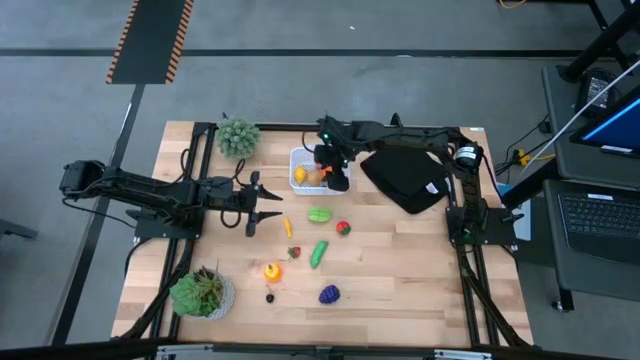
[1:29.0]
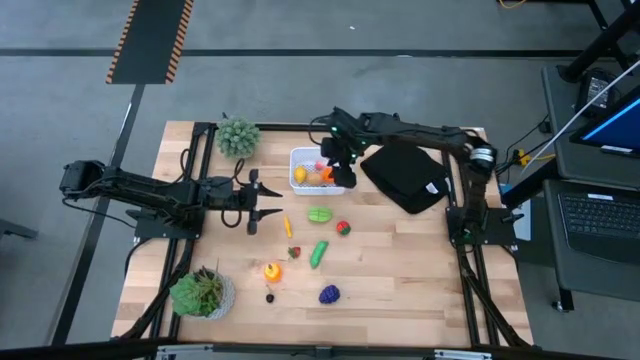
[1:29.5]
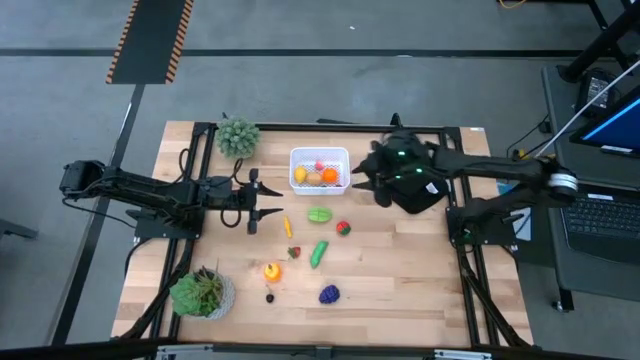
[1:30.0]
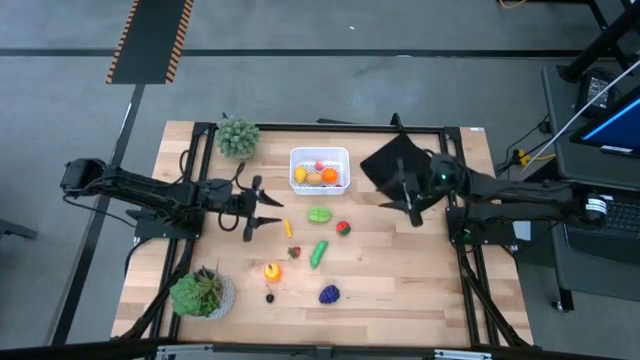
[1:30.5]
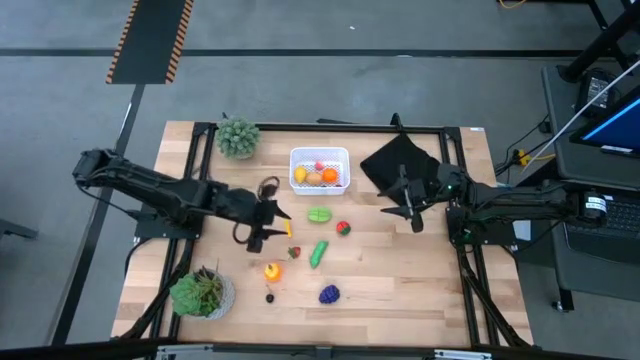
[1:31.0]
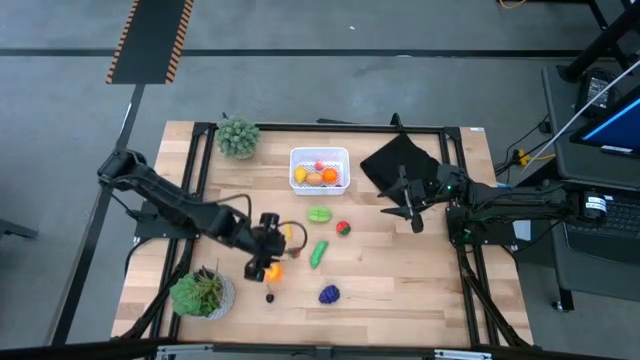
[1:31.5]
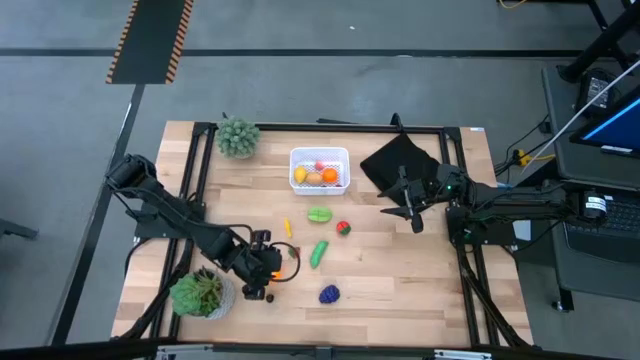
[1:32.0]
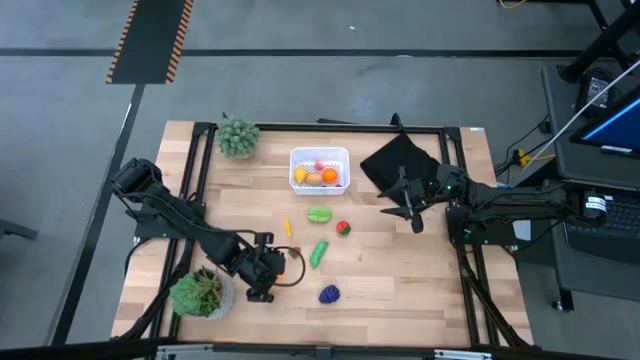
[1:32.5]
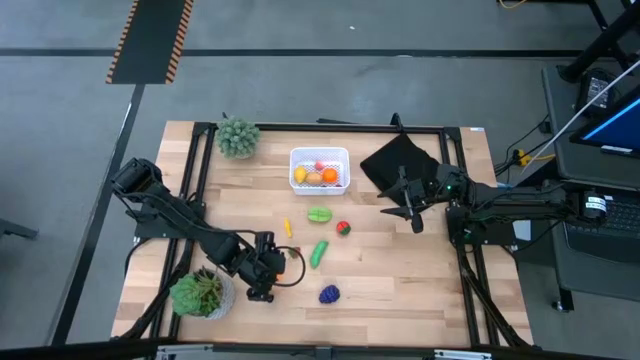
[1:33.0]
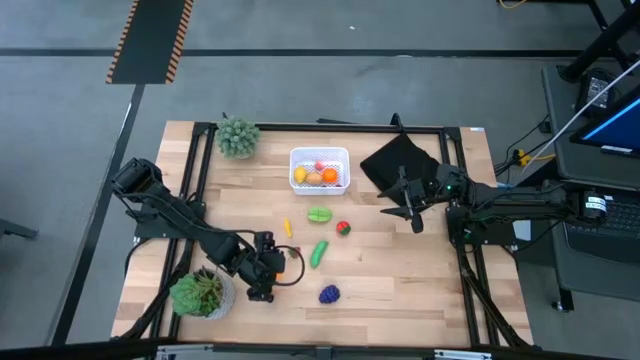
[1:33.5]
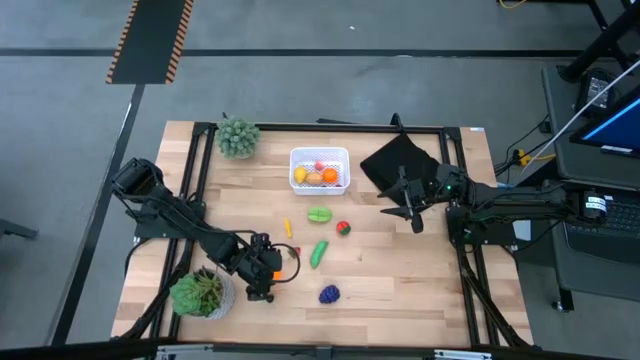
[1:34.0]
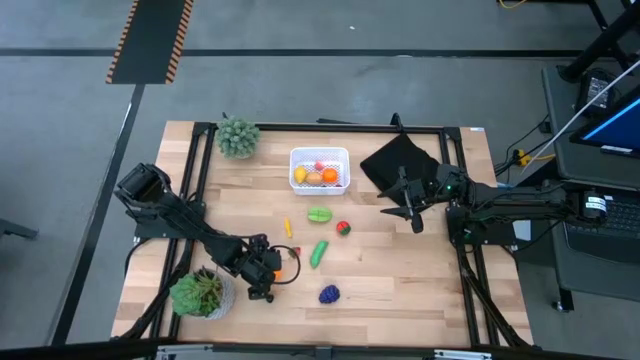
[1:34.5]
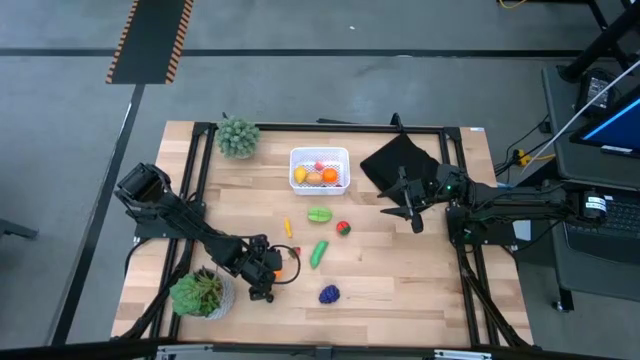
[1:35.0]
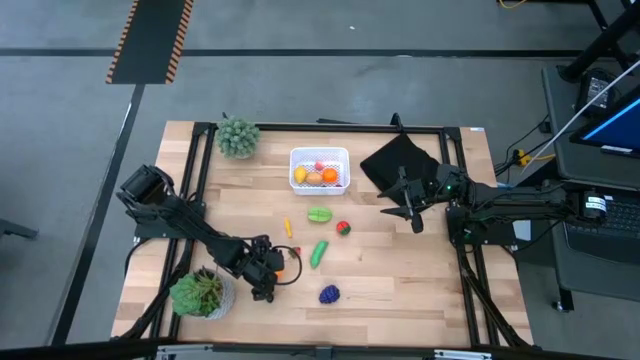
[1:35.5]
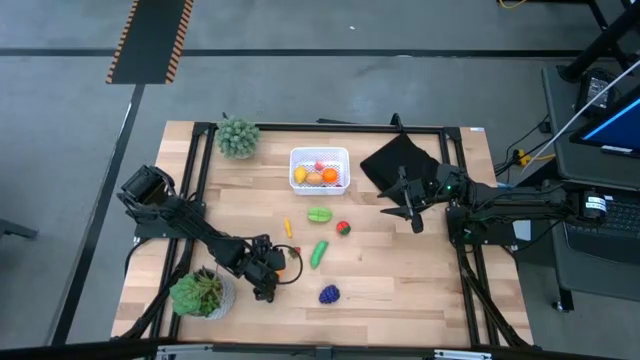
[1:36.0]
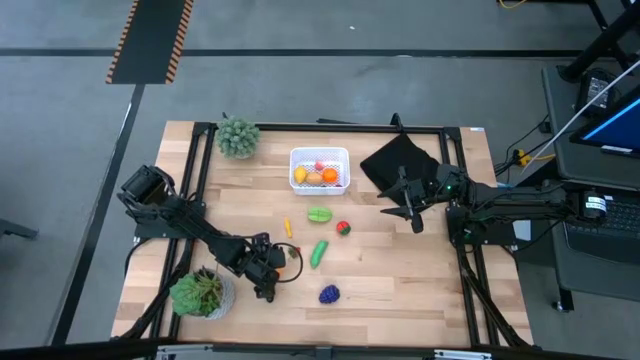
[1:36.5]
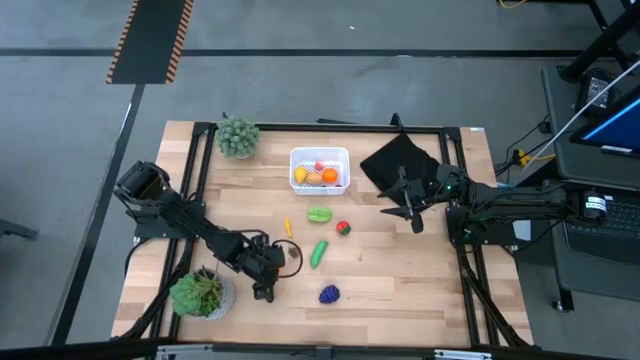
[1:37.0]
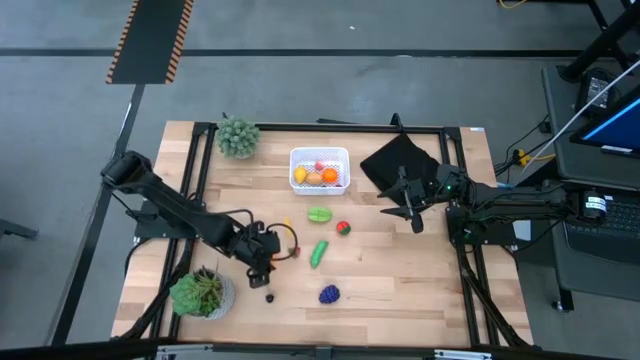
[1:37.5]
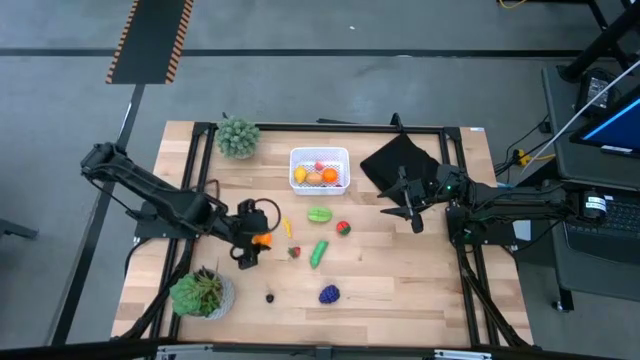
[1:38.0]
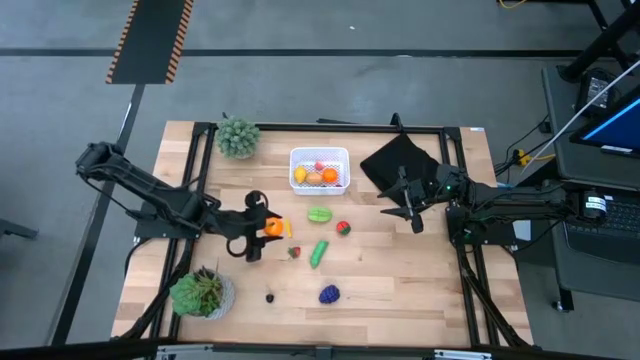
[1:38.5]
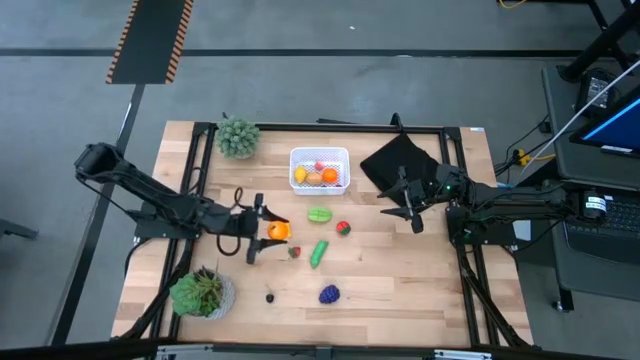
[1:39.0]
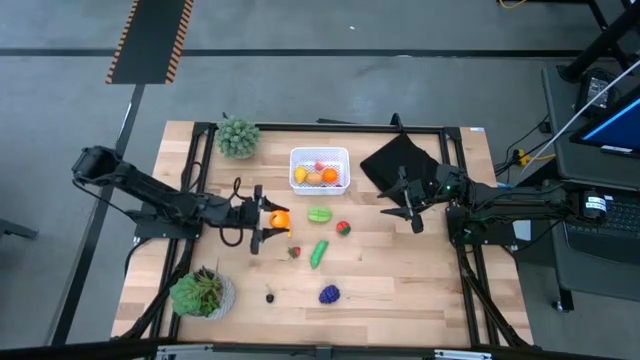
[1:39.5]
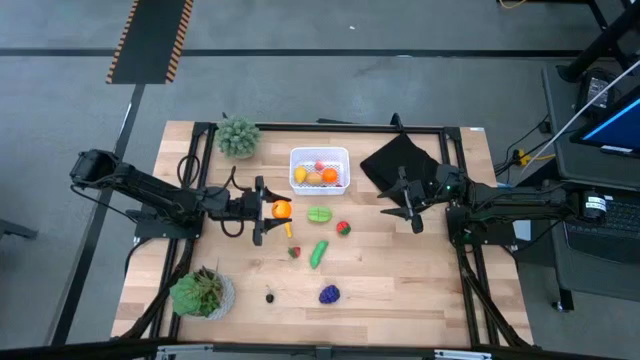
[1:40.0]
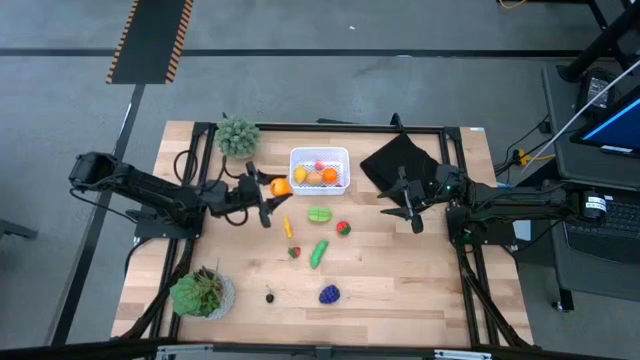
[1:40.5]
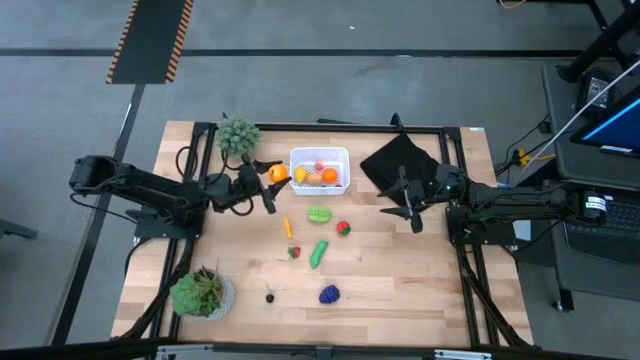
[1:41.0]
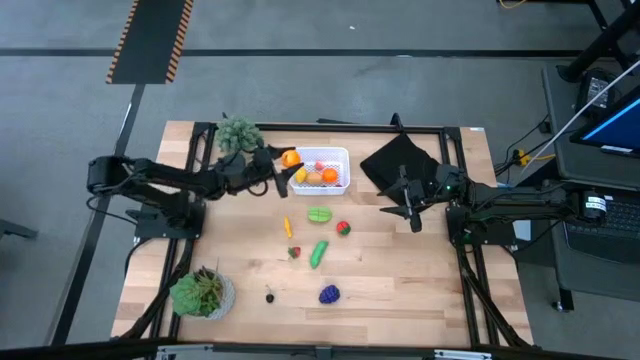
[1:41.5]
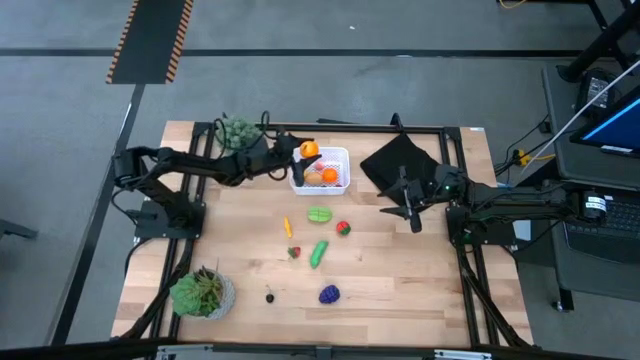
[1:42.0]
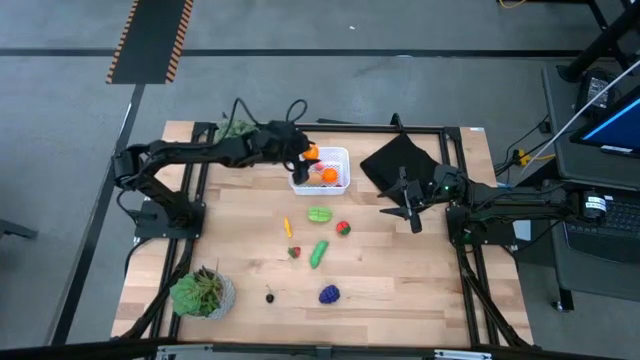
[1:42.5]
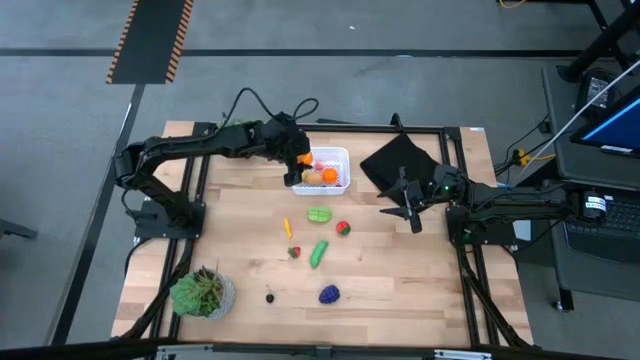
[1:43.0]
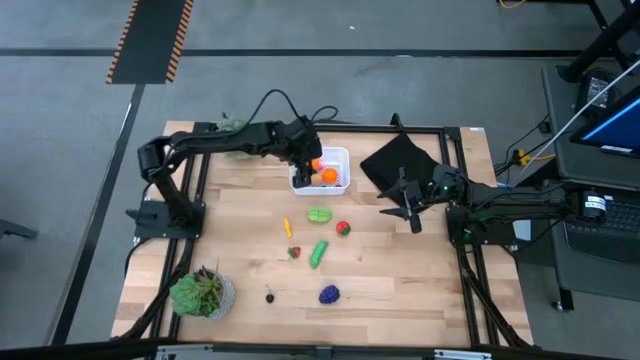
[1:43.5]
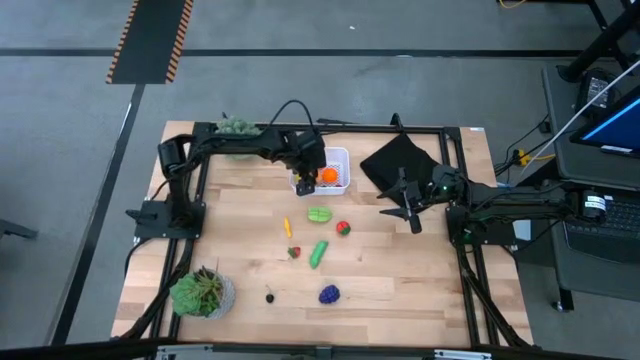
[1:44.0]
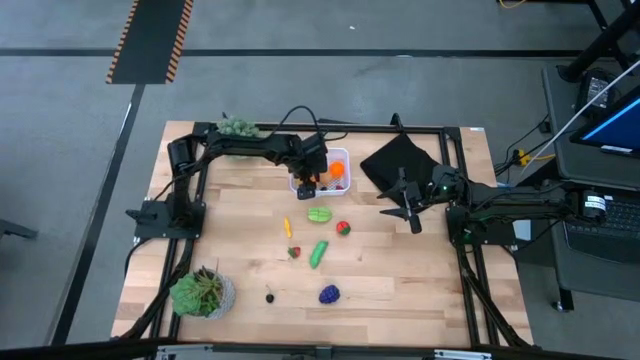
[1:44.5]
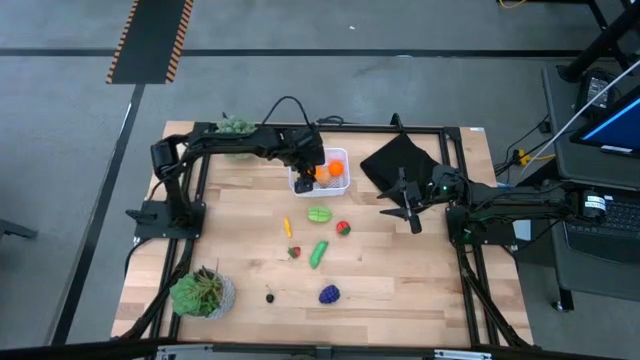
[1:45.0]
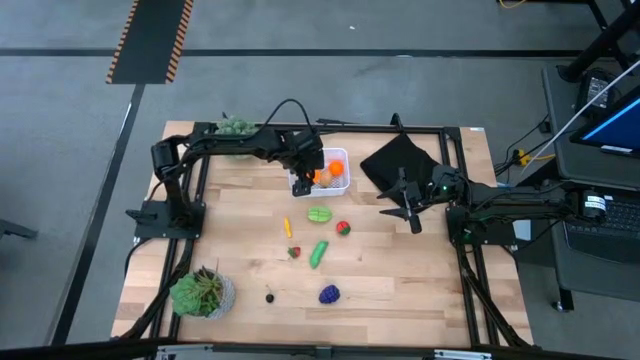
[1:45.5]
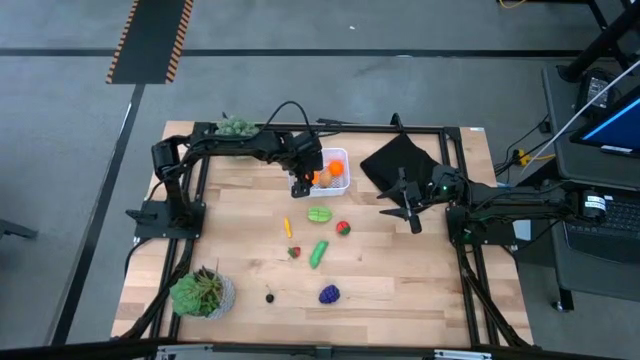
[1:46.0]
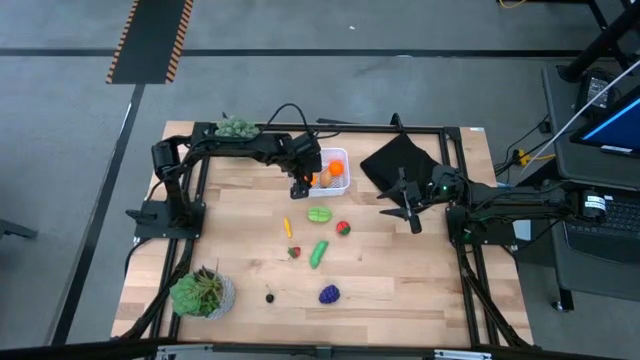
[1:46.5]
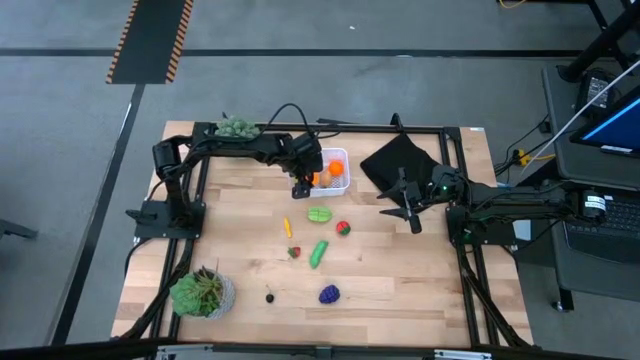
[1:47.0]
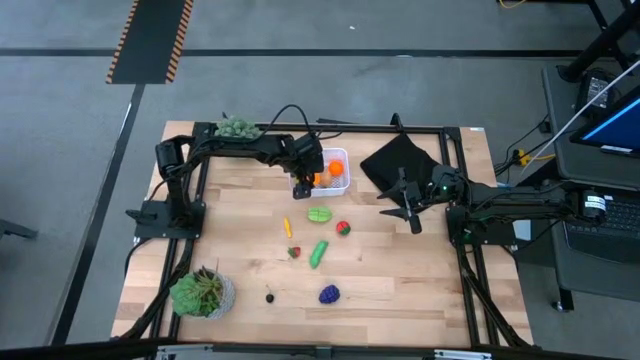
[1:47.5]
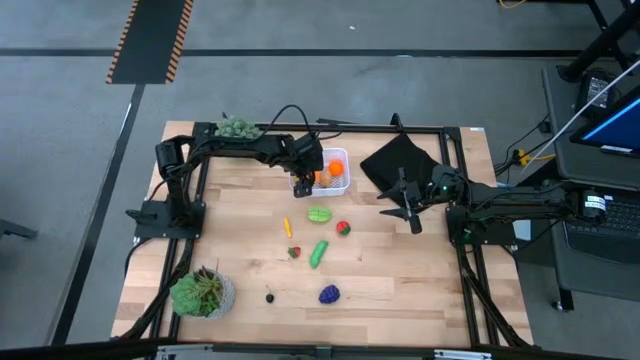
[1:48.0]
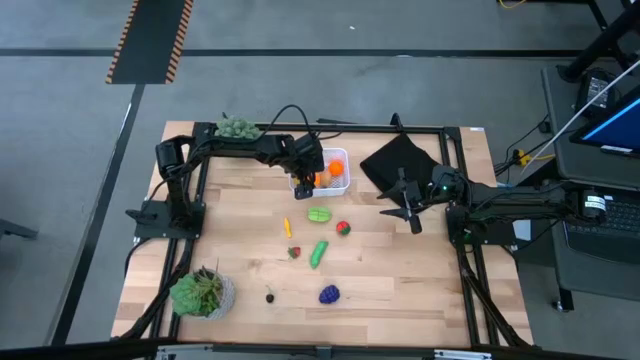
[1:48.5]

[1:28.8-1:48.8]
Task: Pick and placing Produce into tupperware
Put the tangerine into the white bin

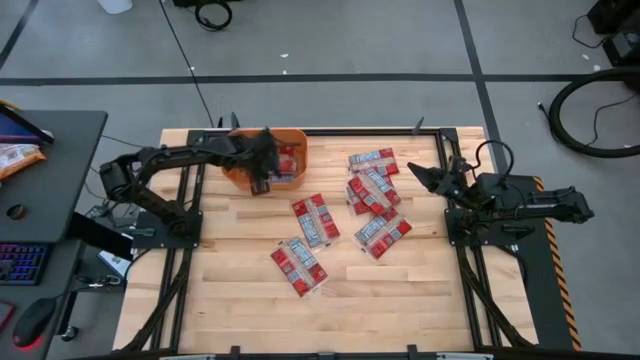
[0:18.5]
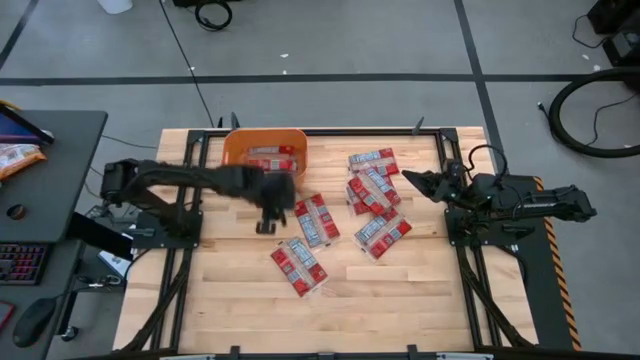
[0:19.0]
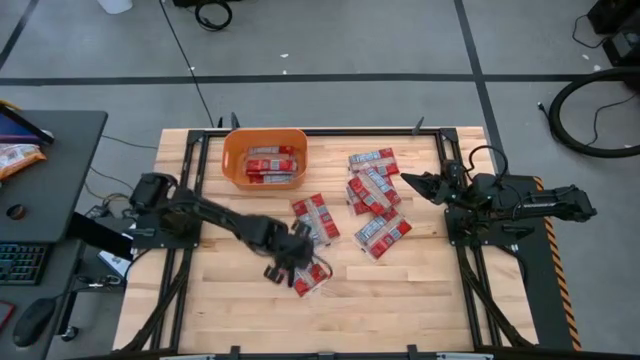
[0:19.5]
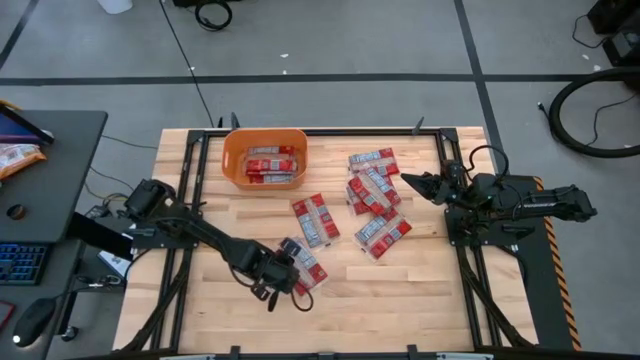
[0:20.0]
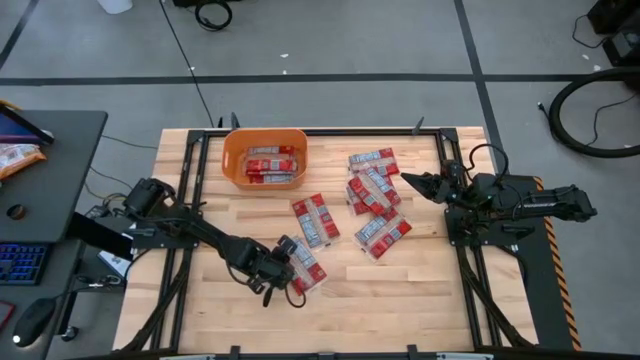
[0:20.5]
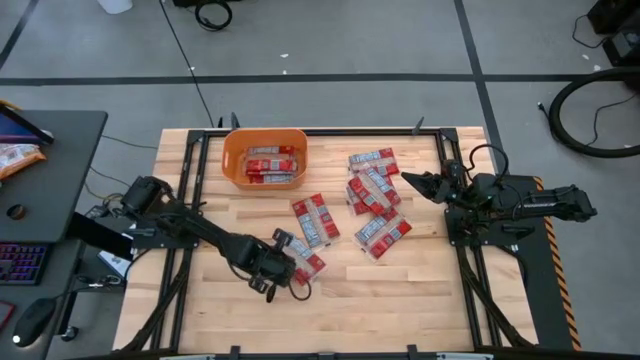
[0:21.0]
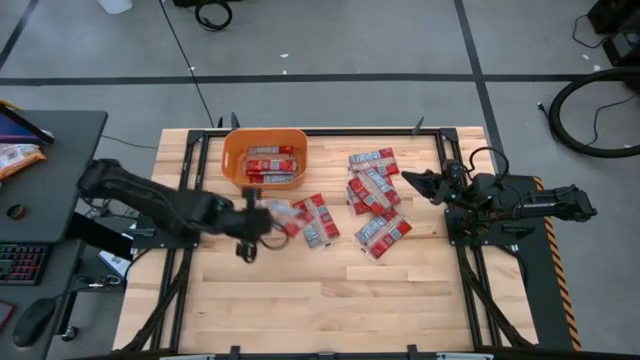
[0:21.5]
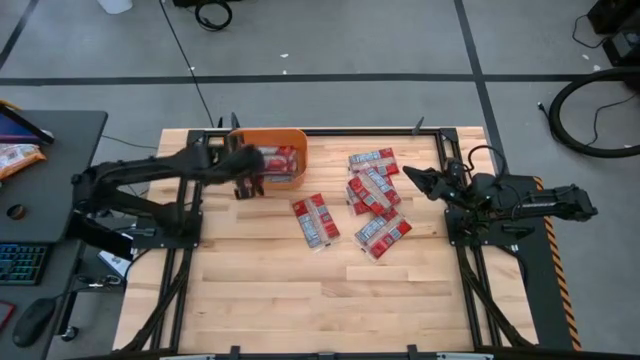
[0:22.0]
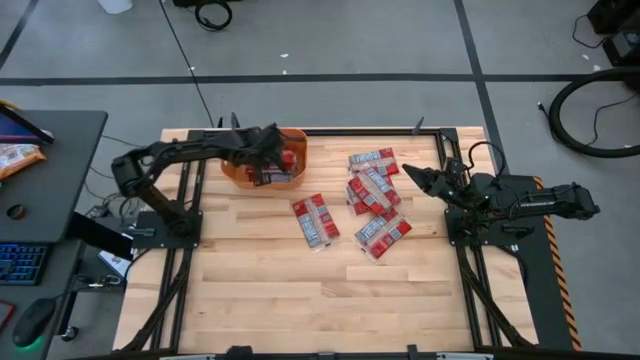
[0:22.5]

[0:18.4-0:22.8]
Task: Sort popcorn bags into baskets
Put the red popcorn bag into the orange container
